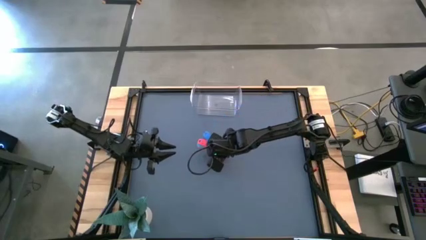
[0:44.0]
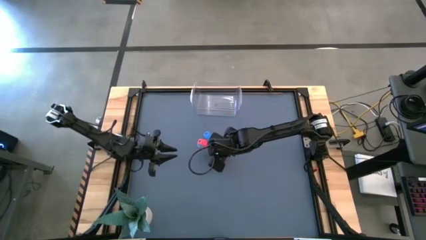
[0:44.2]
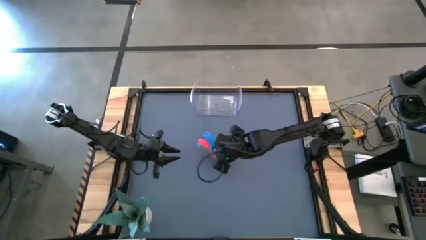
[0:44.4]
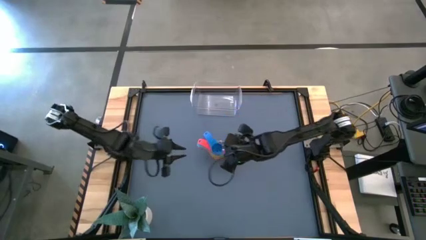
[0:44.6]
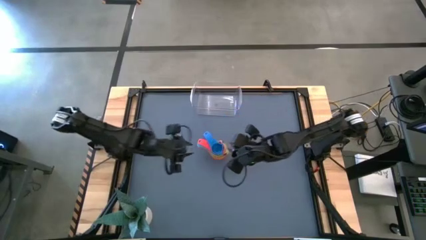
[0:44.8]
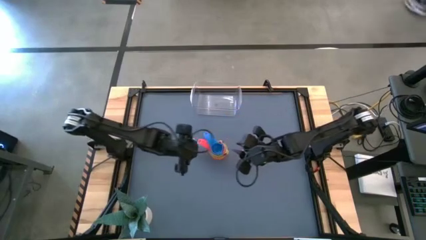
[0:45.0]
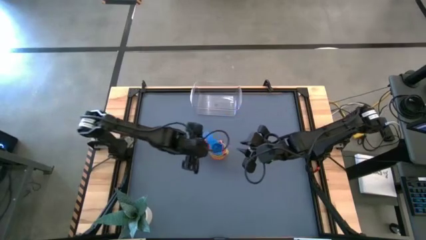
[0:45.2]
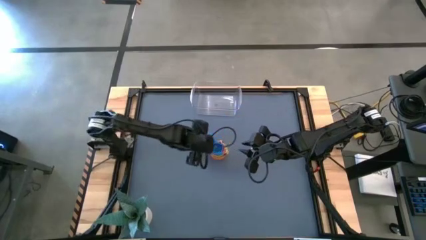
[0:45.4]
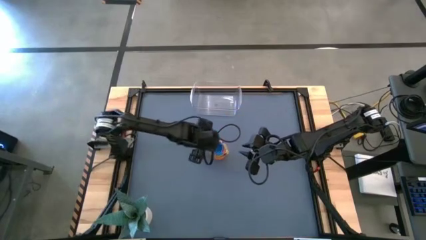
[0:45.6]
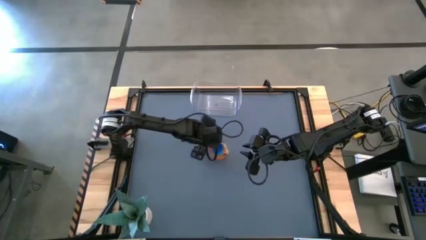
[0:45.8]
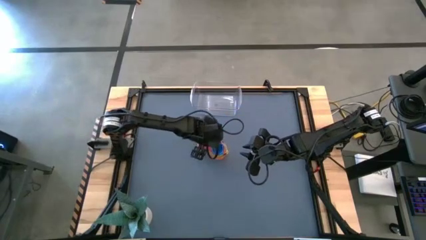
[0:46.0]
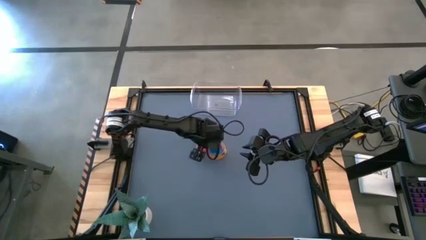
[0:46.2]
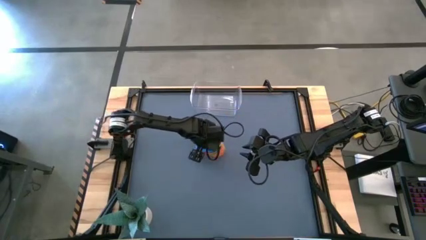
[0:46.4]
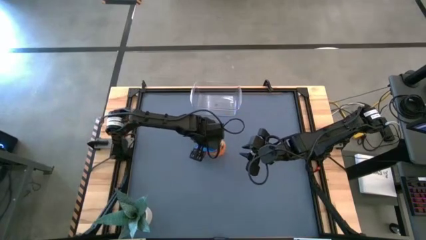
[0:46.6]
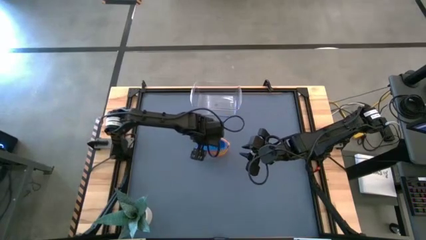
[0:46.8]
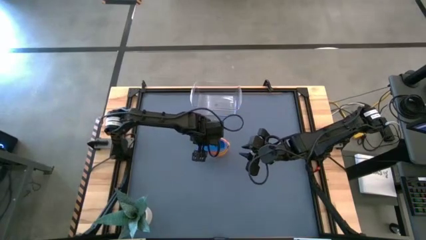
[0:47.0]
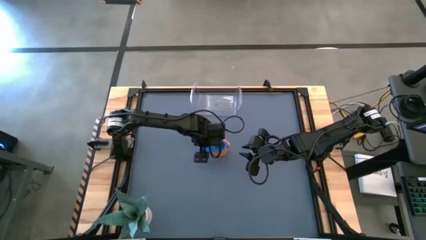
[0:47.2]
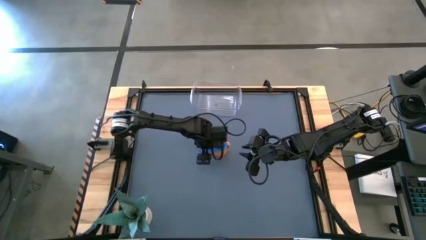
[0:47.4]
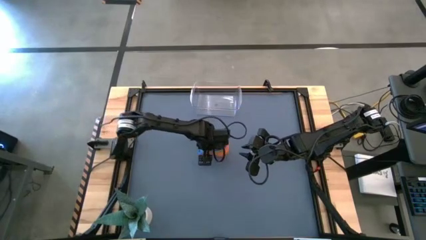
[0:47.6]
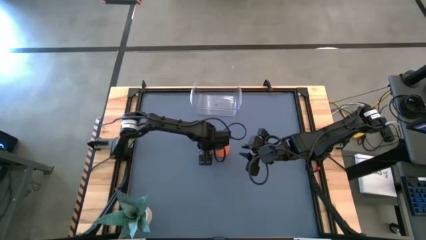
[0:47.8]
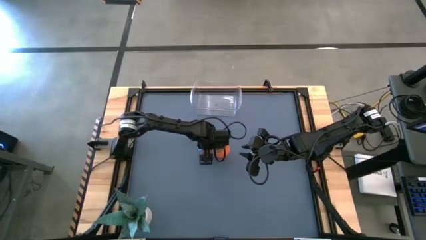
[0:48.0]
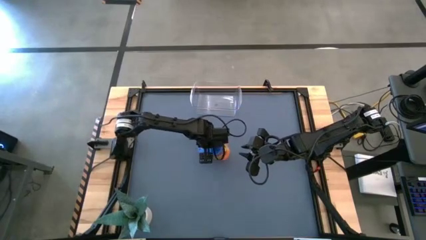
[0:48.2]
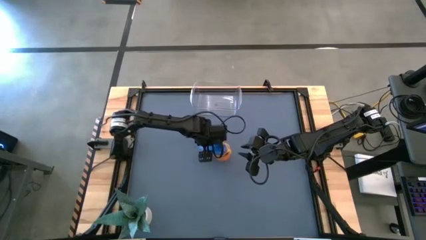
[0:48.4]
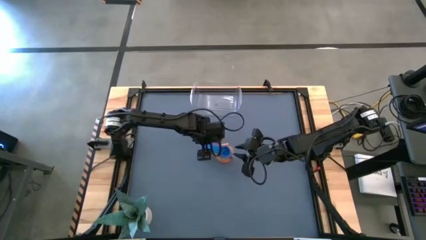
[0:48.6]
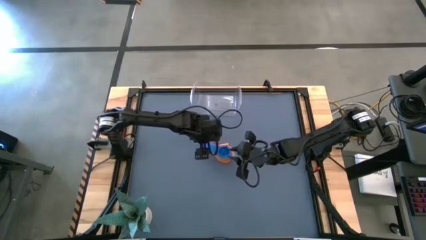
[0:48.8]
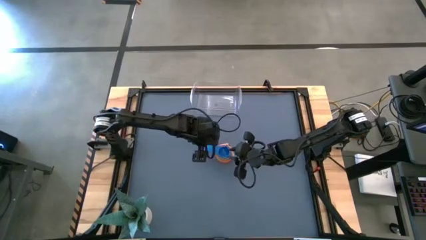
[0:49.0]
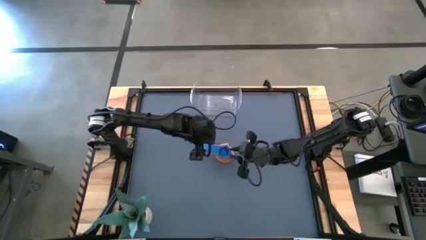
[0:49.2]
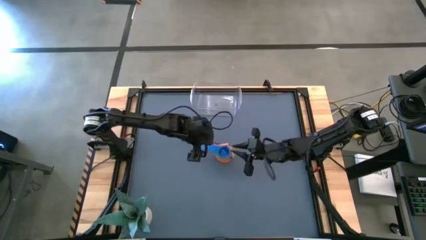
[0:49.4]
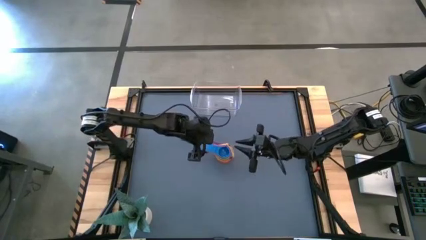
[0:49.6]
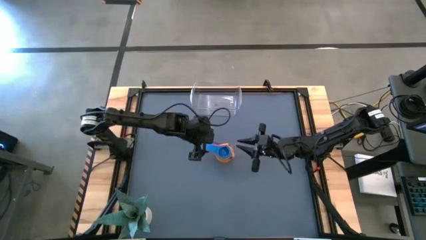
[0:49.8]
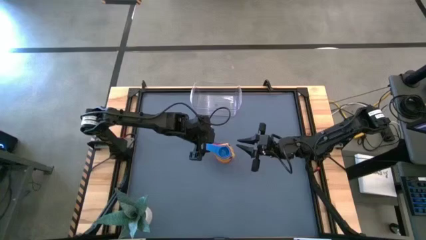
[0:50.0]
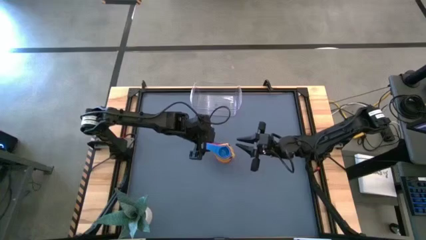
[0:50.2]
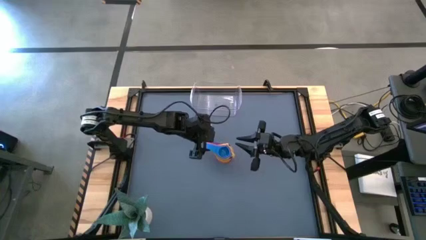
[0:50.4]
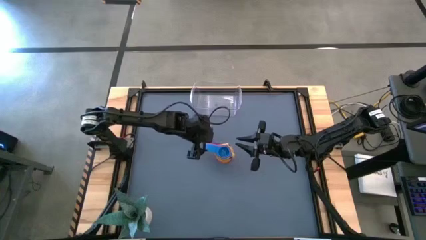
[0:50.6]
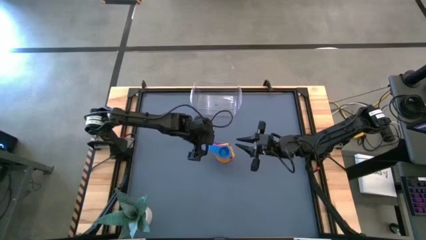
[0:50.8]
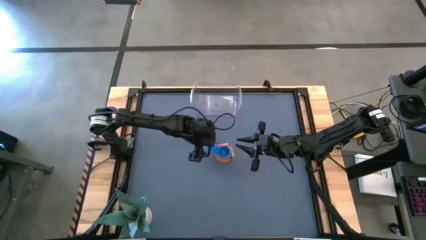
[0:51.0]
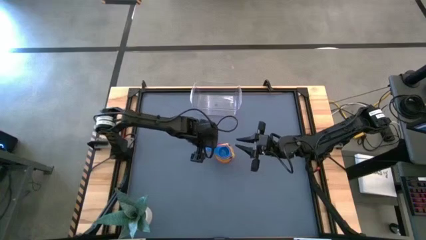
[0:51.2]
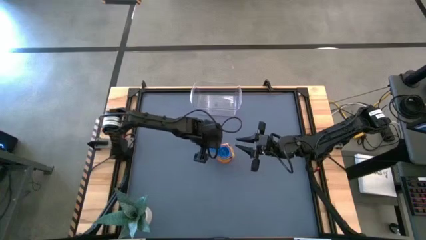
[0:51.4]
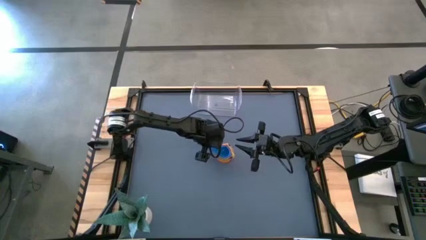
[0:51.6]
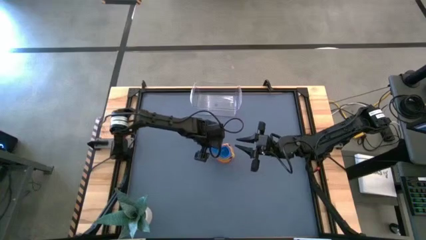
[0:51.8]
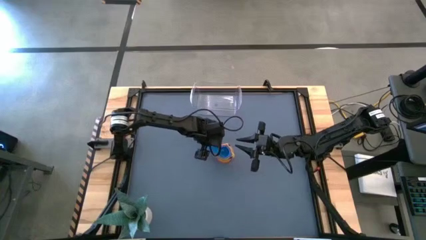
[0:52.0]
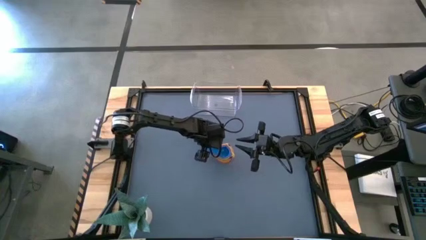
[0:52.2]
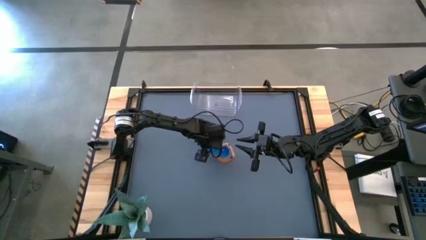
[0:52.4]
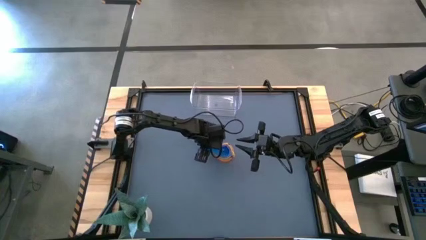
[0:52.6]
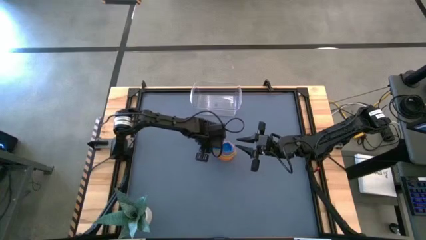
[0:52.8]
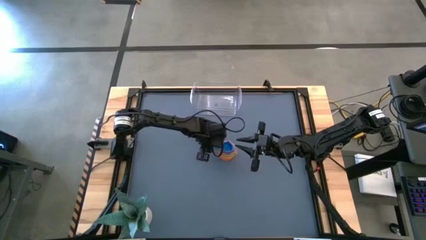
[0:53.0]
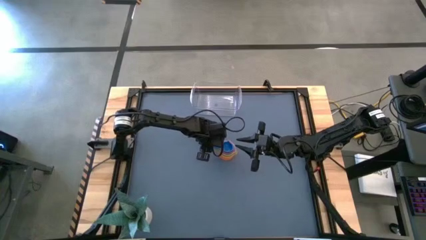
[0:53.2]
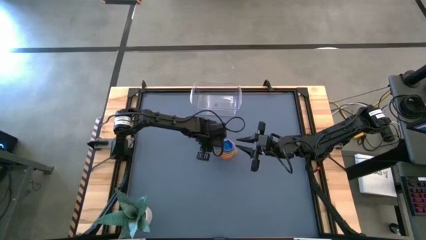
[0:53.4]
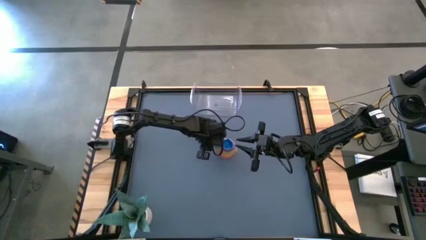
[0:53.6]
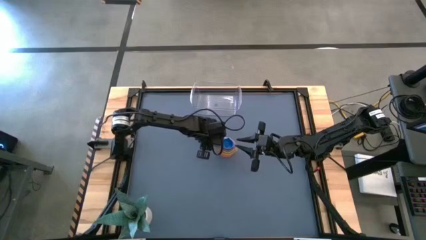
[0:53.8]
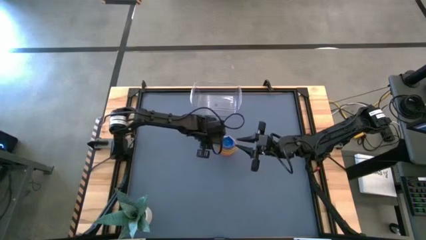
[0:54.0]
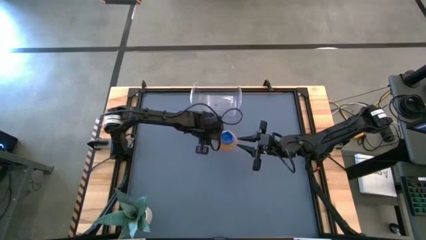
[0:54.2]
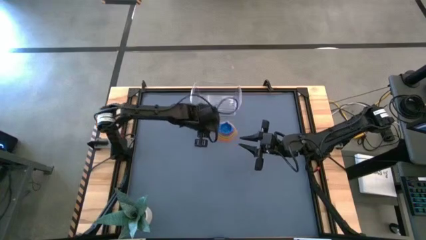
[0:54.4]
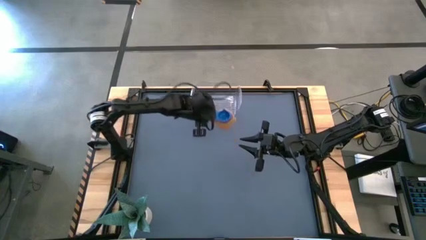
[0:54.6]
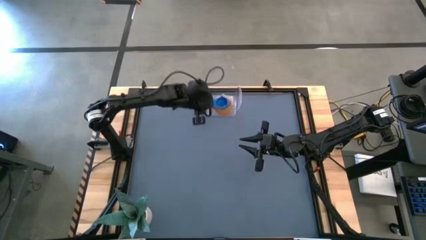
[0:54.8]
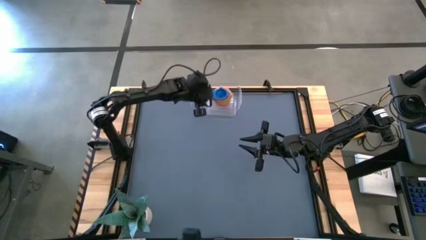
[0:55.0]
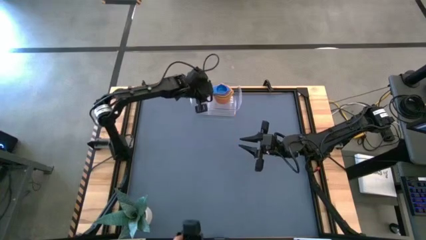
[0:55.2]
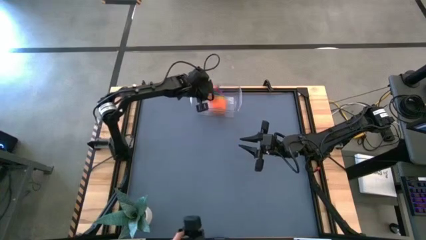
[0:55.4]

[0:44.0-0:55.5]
Task: Nest measuring cups in basket
Put the stacked measuring cups into the transparent bin

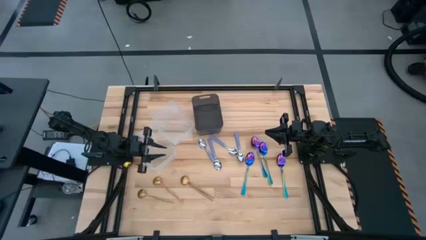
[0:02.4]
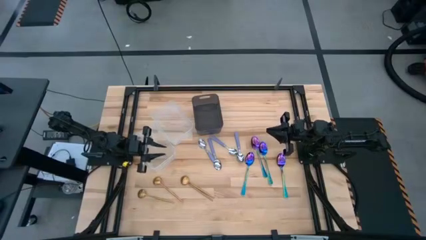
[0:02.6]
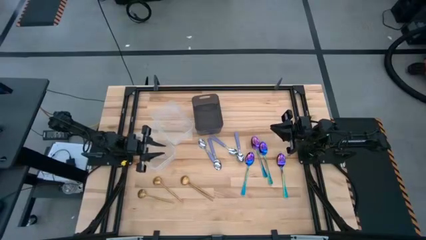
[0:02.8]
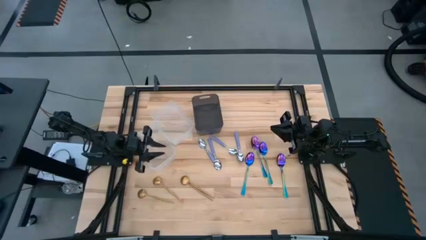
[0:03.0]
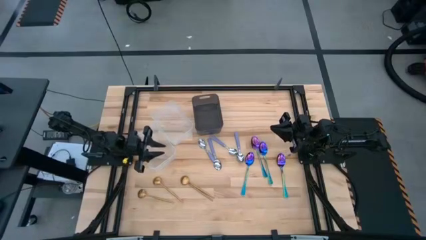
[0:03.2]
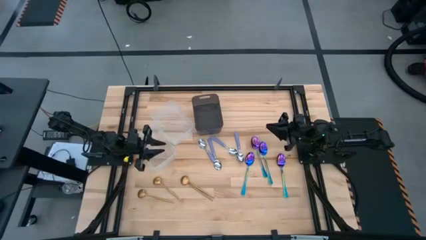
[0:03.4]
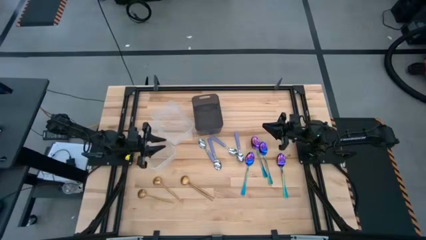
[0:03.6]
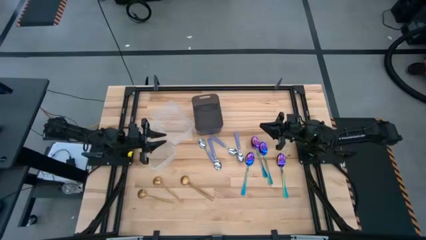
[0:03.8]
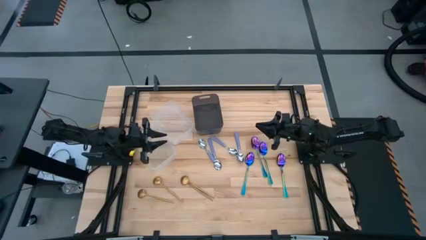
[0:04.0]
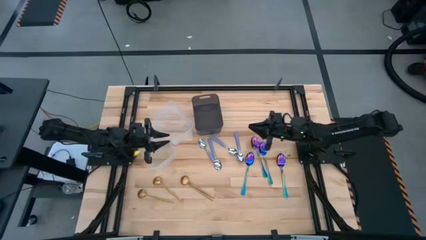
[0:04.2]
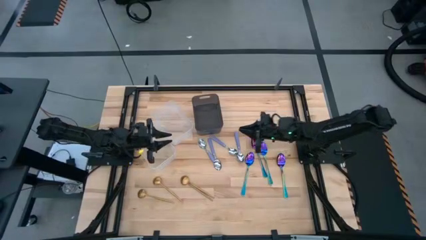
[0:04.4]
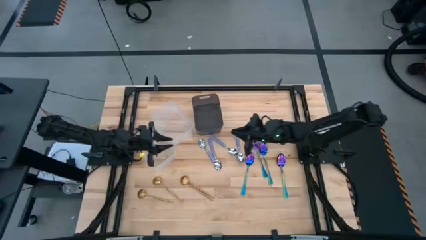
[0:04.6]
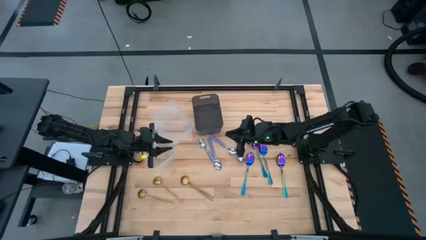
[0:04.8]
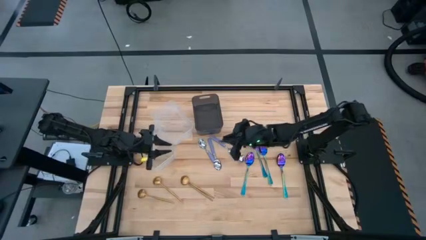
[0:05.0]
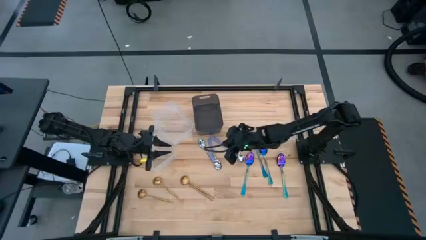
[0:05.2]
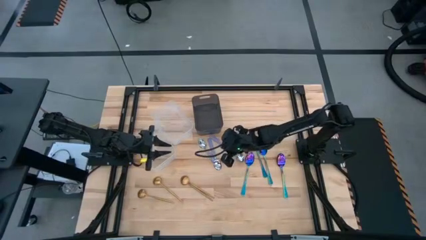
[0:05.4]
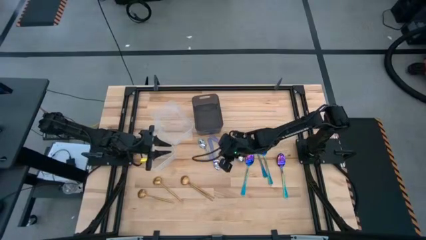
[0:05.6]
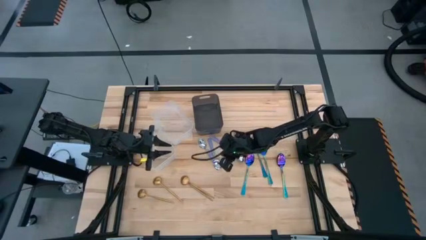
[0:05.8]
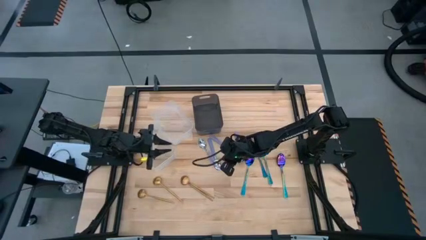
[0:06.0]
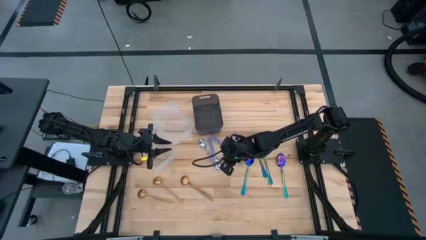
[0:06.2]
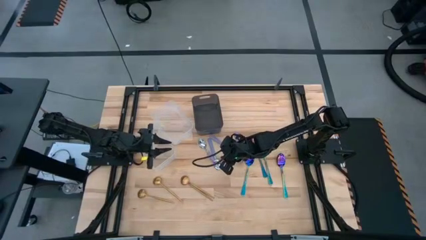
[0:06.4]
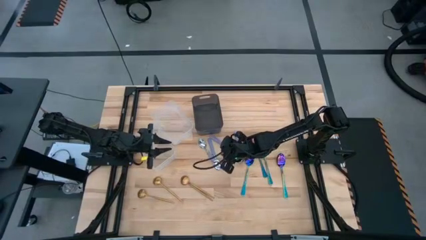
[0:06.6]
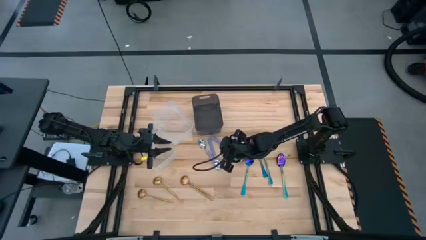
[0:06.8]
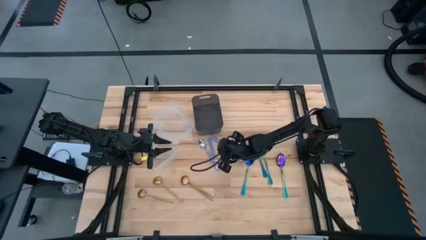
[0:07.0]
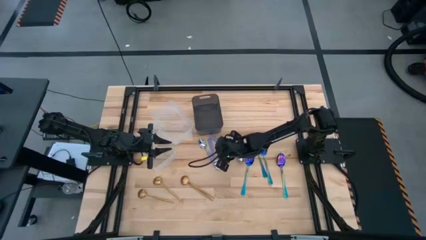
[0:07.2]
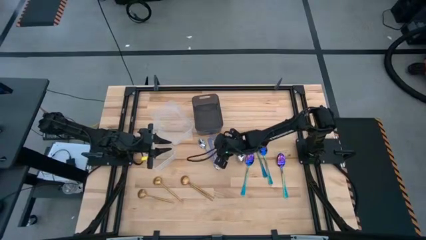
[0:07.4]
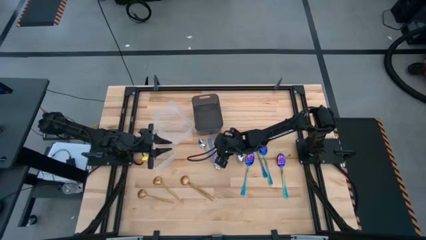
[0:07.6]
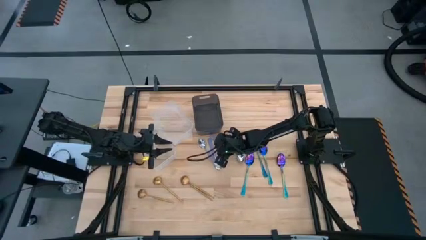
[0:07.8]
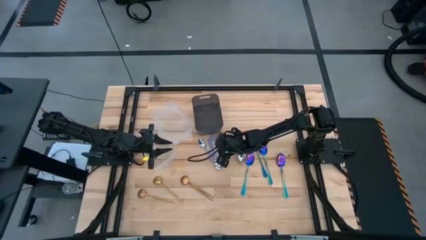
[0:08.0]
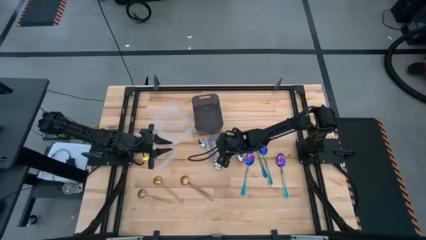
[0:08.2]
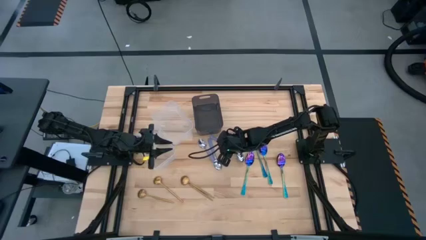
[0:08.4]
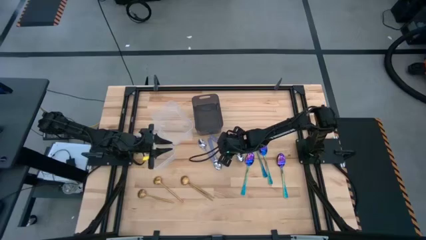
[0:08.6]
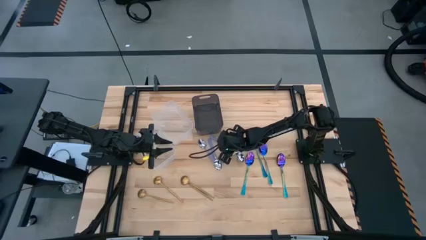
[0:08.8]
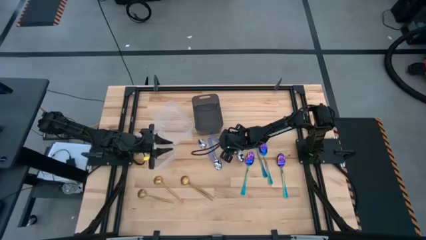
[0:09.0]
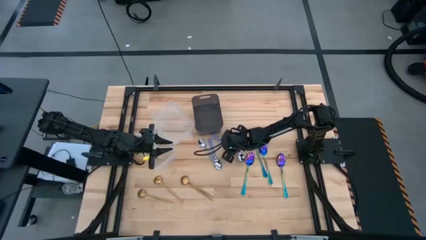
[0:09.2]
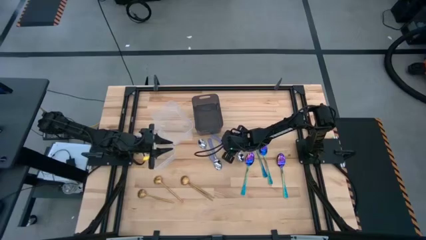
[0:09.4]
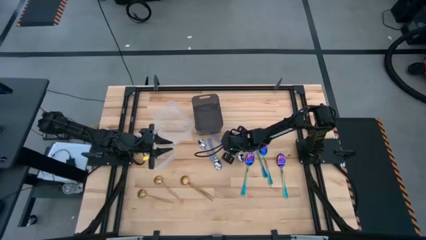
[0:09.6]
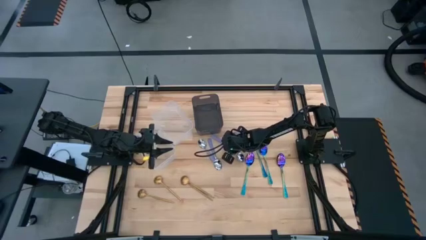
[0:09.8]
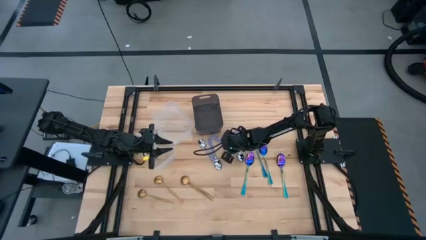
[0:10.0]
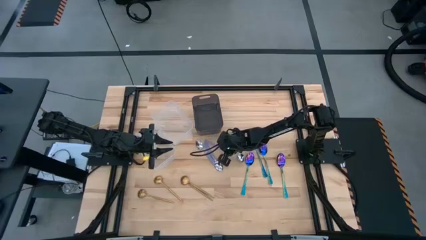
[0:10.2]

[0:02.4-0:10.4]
Task: Sort silverware by color (type)
Put the purple spoon into the black transparent bin
